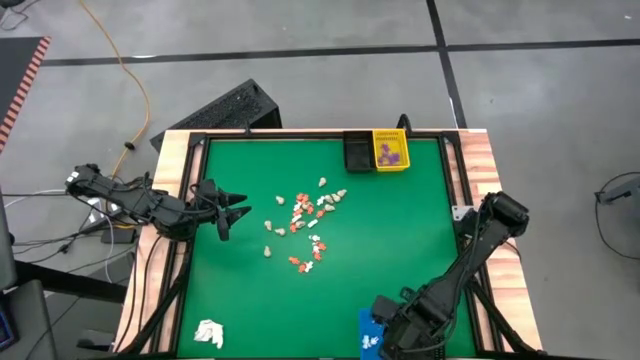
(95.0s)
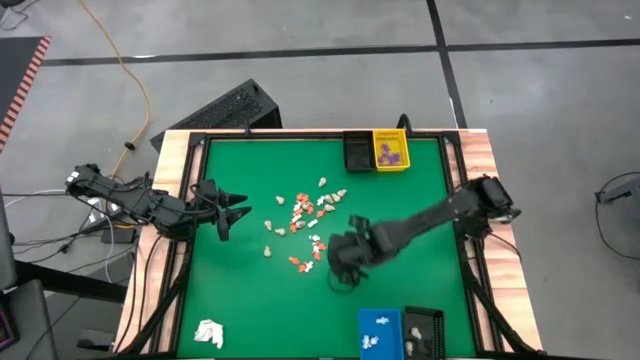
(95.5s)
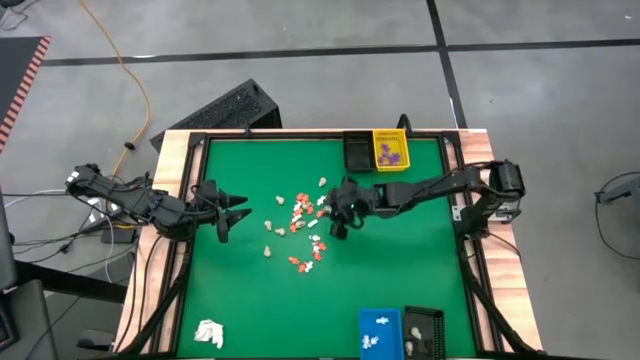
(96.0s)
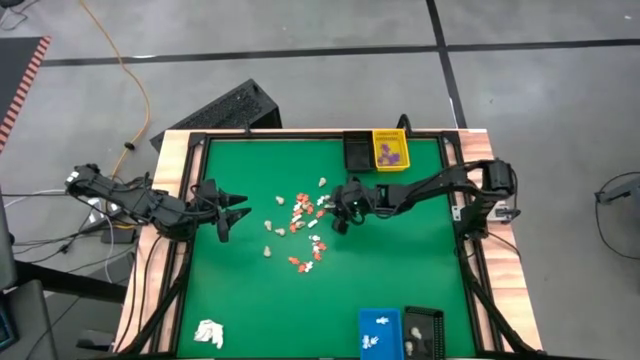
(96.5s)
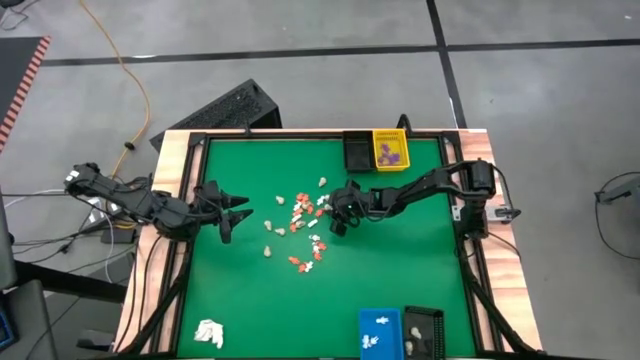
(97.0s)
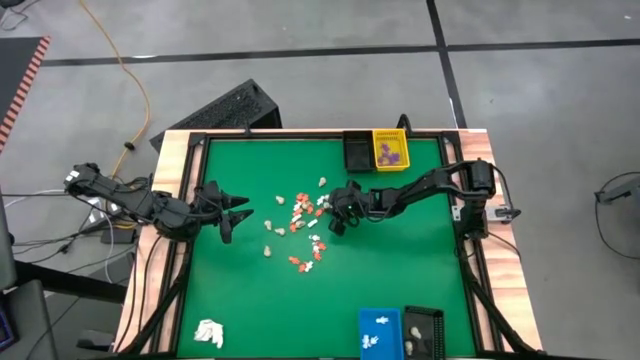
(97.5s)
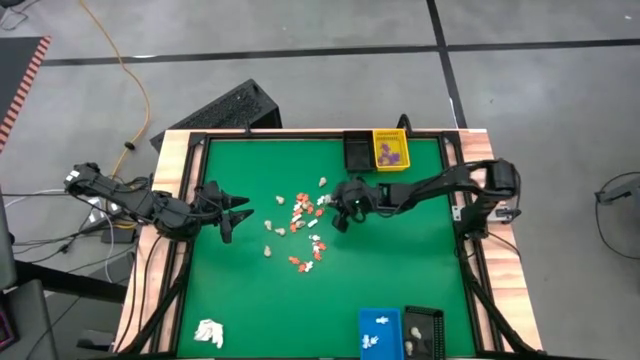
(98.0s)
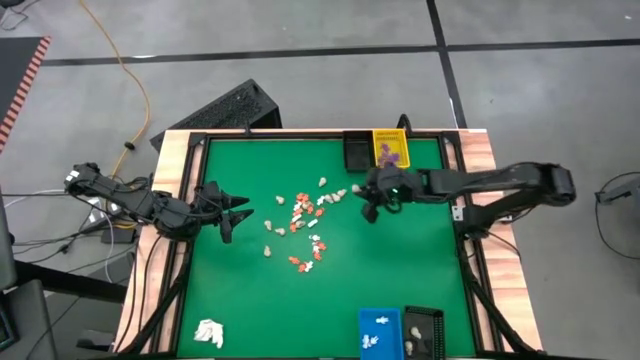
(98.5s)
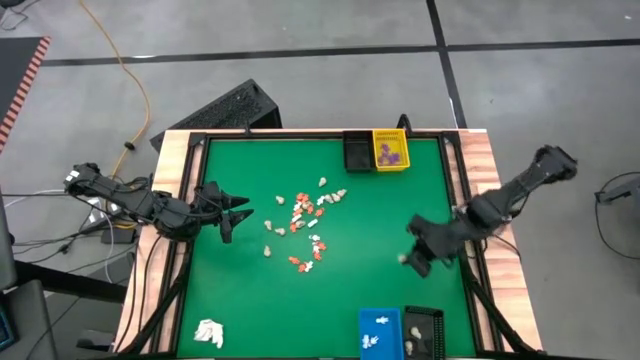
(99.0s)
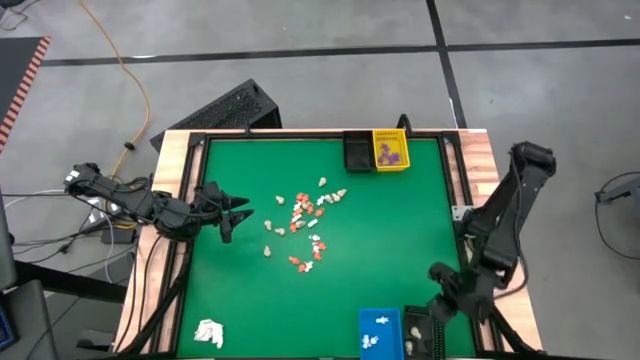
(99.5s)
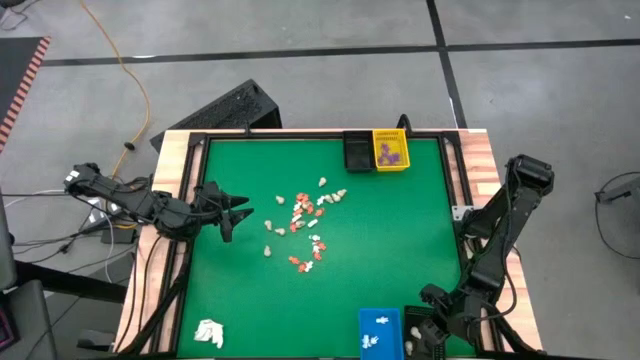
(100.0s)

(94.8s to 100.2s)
Task: Sort Halloween decoration
Put the white skull toy into the bottom black basket

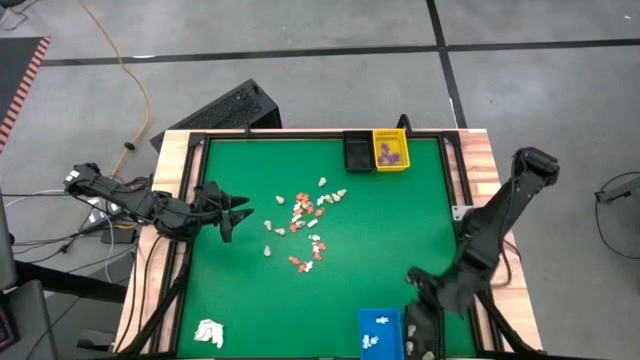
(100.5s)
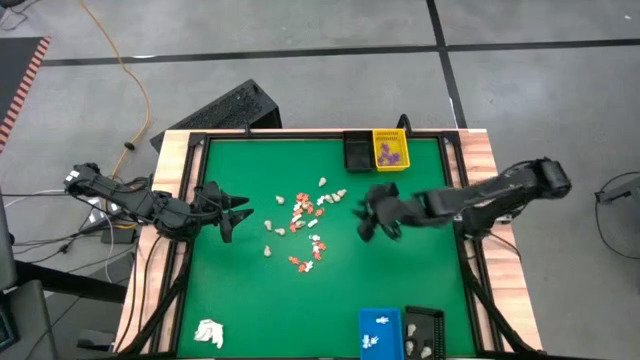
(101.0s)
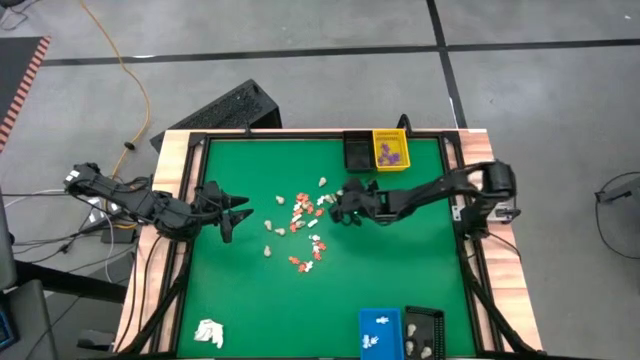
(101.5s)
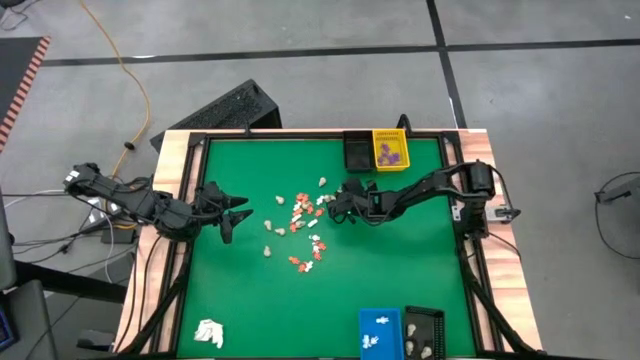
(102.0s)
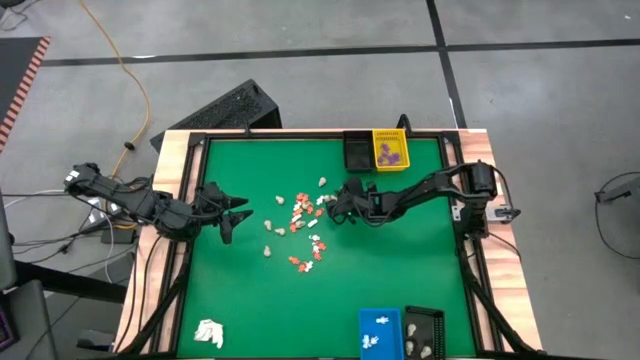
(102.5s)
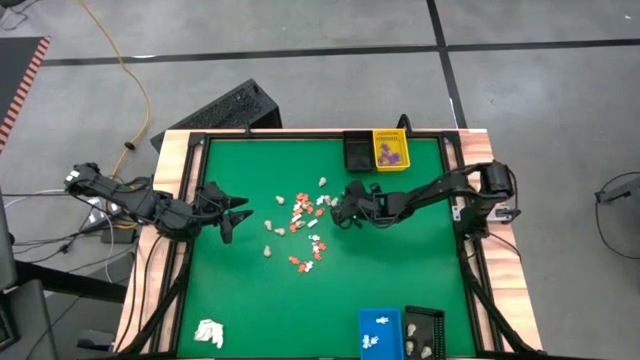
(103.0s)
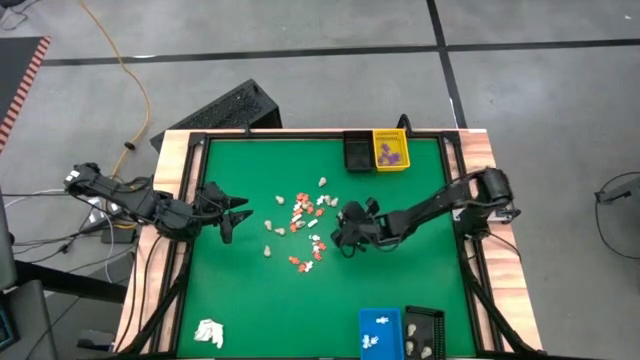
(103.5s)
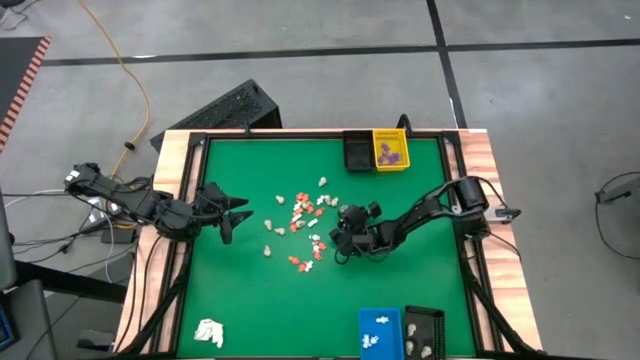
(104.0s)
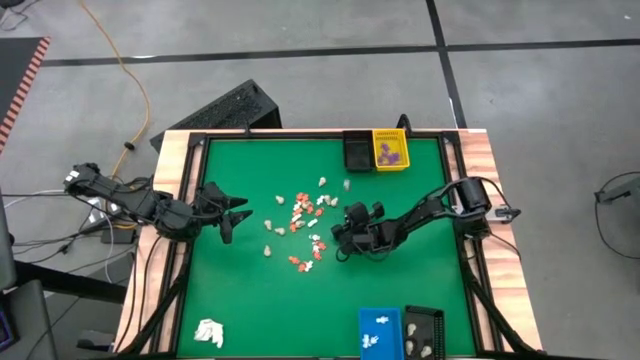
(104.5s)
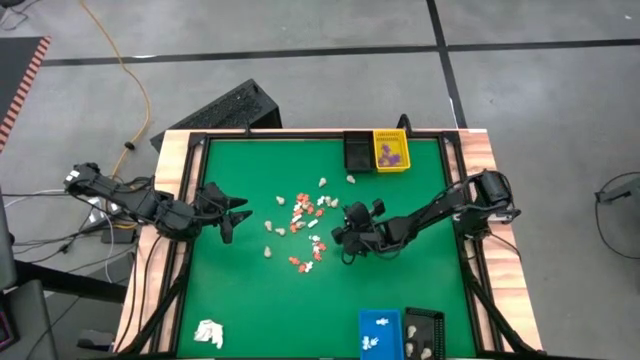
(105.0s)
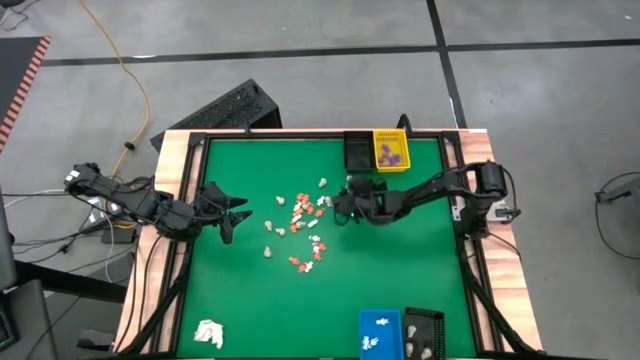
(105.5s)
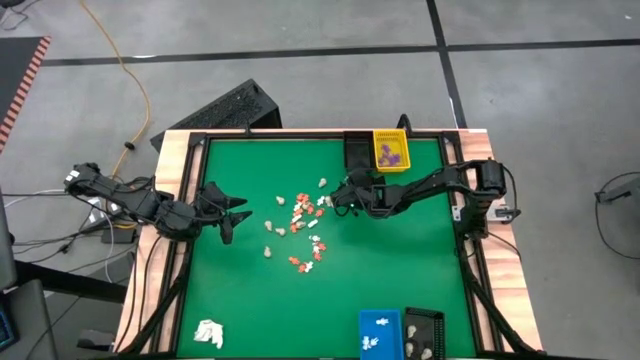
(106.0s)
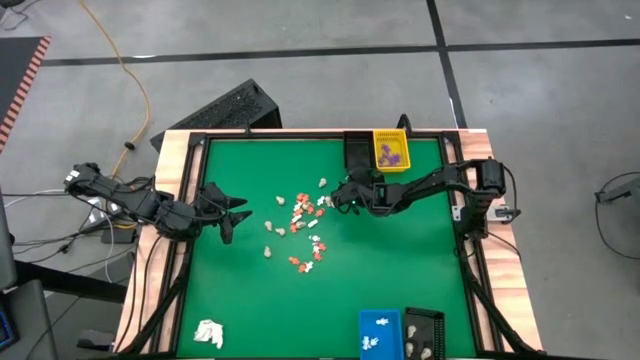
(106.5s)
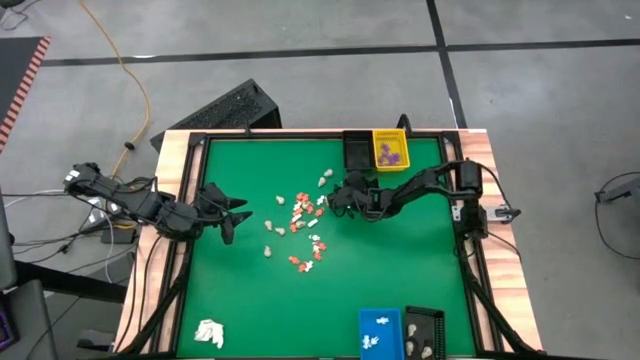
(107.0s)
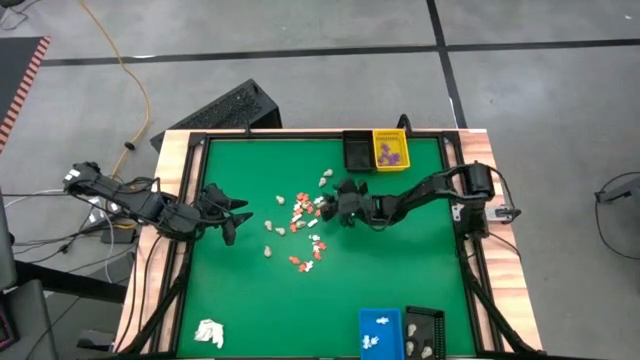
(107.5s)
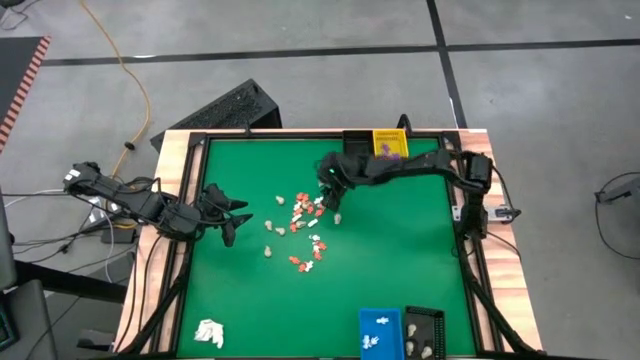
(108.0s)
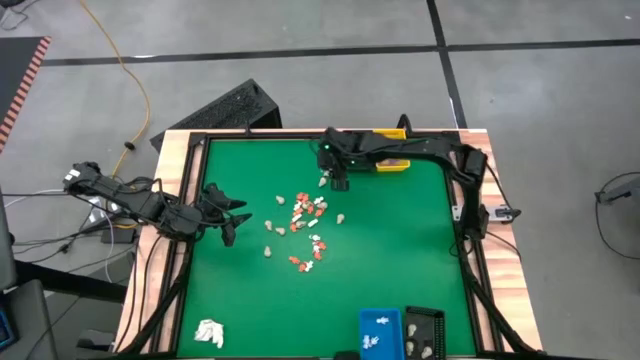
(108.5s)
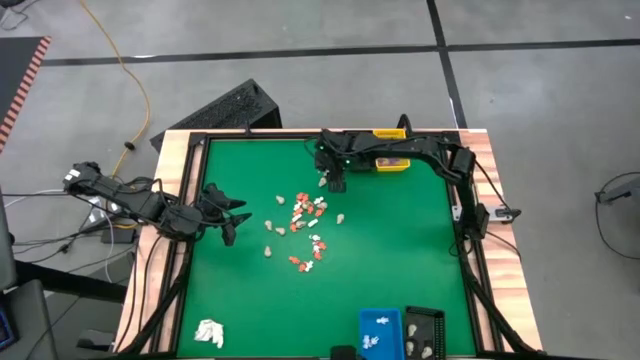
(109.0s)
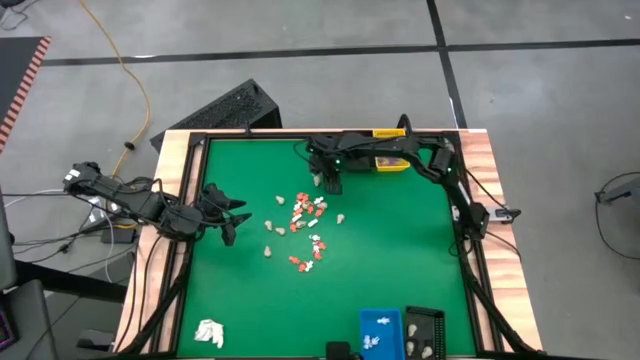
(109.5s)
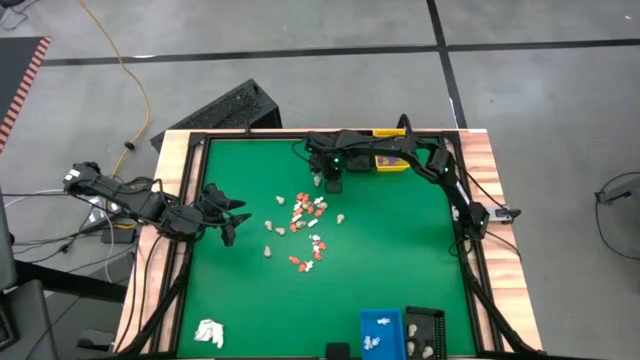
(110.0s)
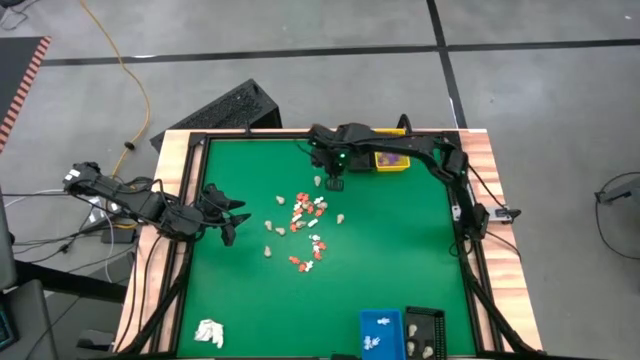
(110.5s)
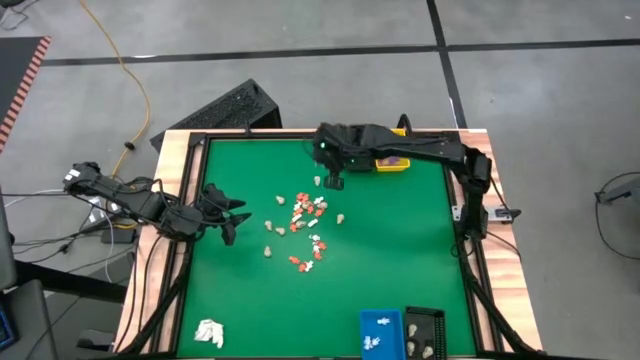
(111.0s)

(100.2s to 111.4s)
Put the white skull toy into the bottom black basket

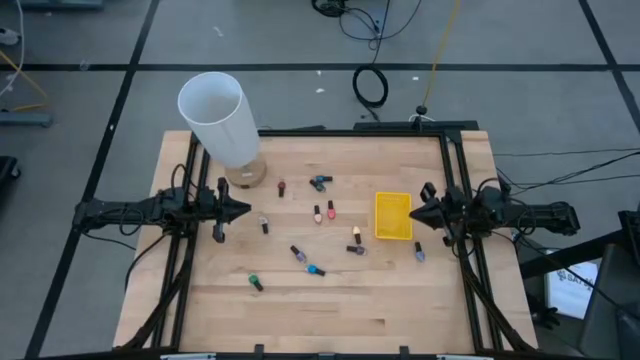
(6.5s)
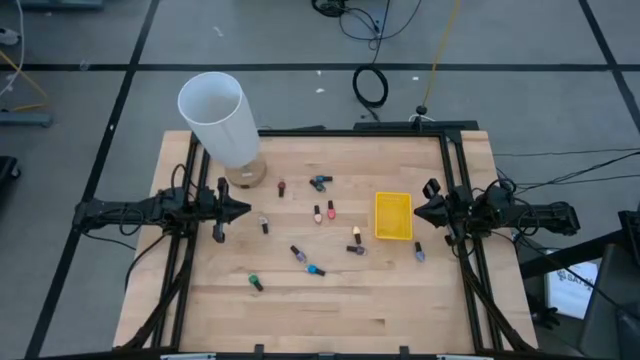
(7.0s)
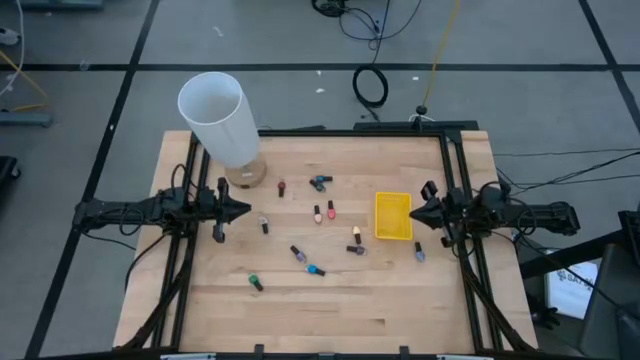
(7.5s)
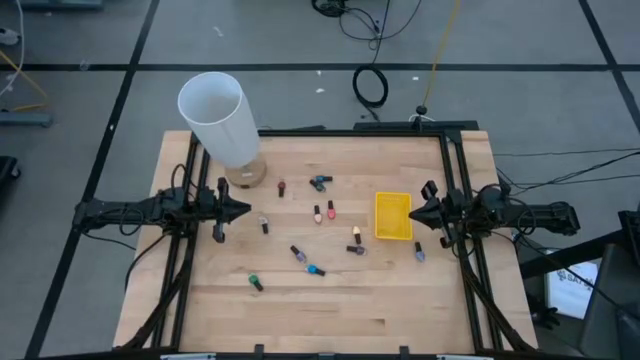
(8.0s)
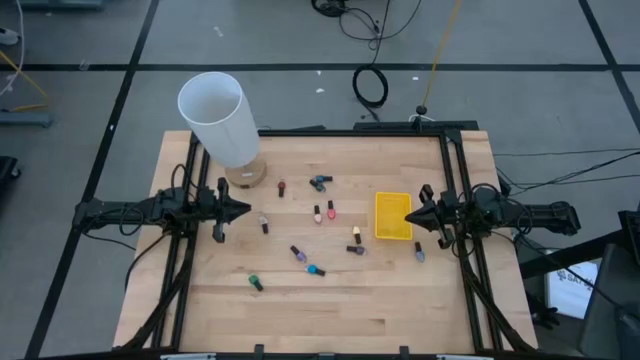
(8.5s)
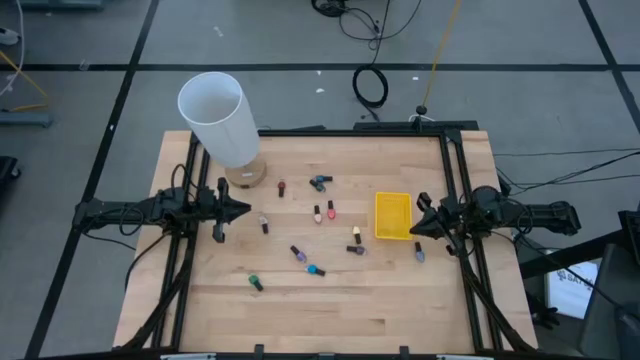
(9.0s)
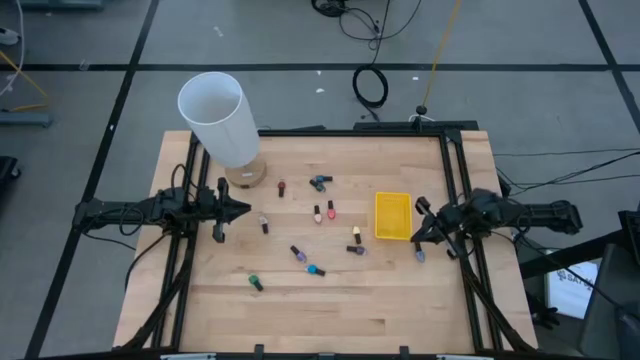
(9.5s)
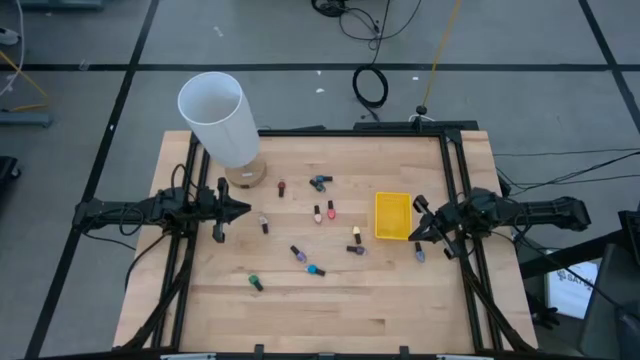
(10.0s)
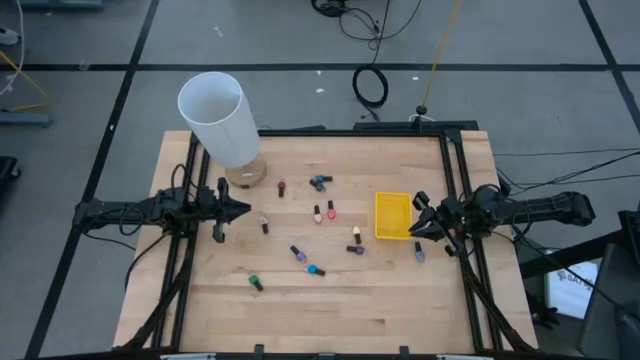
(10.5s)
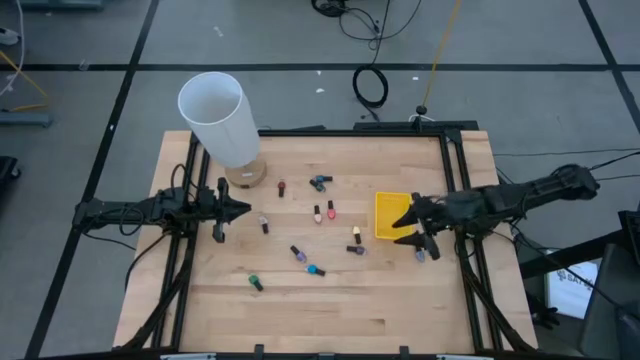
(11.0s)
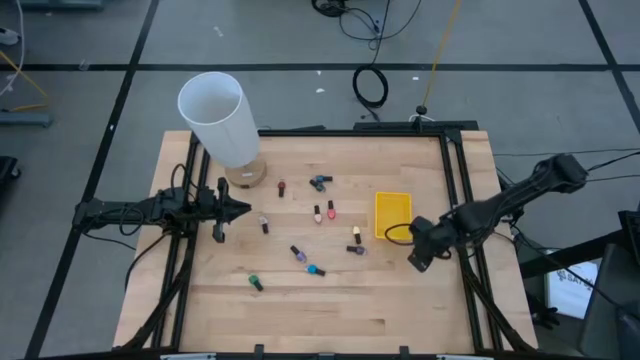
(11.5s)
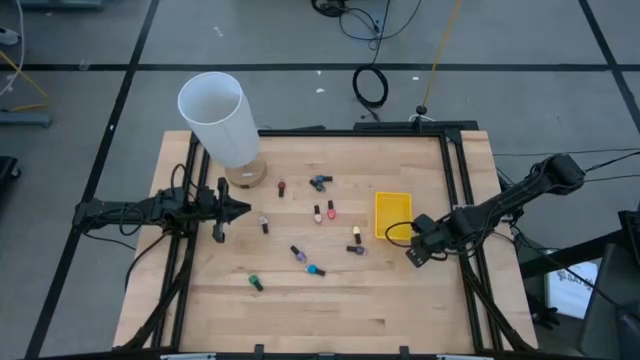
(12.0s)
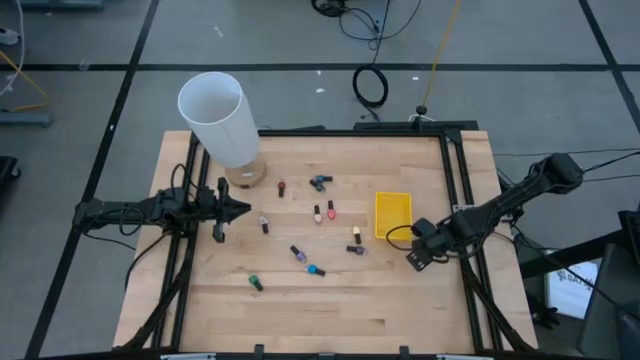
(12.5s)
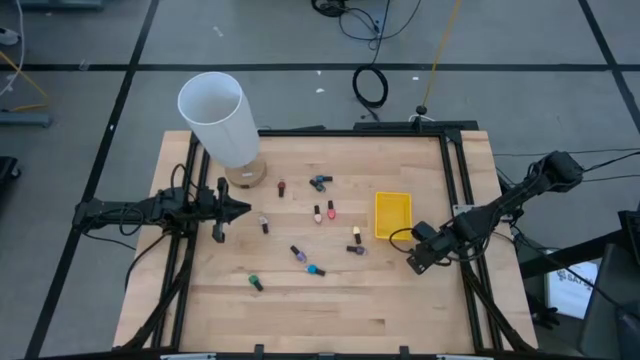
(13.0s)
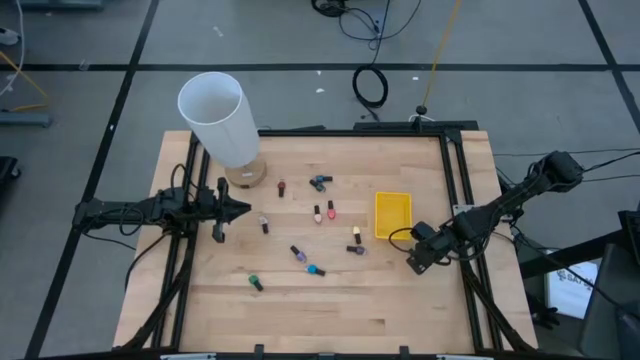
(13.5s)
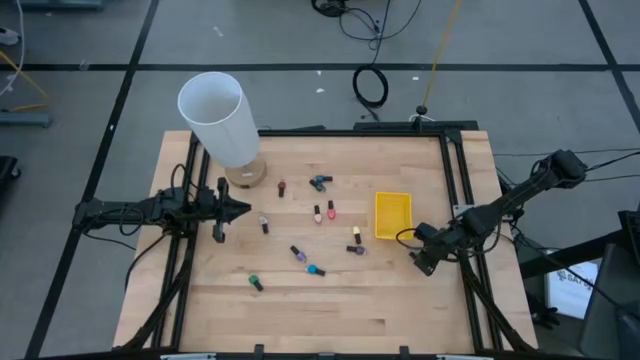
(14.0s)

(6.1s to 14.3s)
Task: Pick & Place Nail Polish
Put the light blue nail polish into the yellow bin
